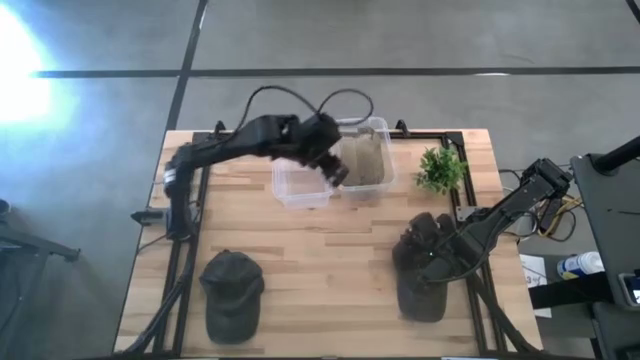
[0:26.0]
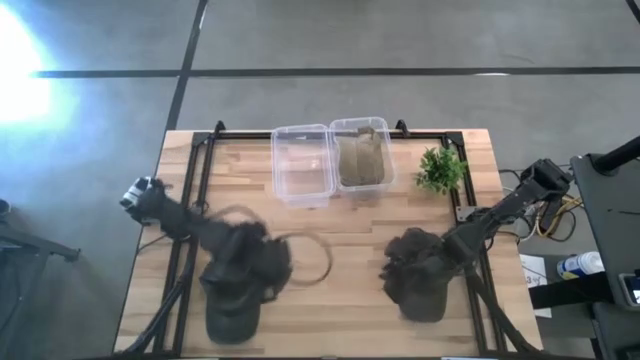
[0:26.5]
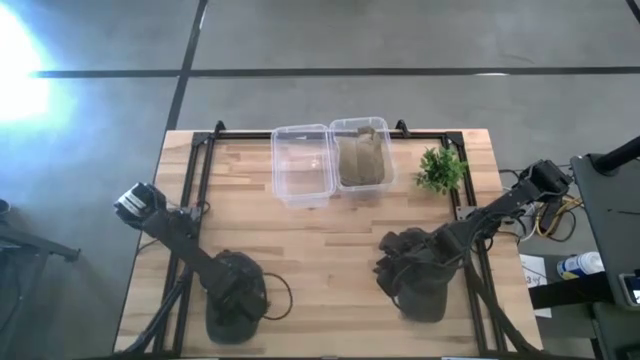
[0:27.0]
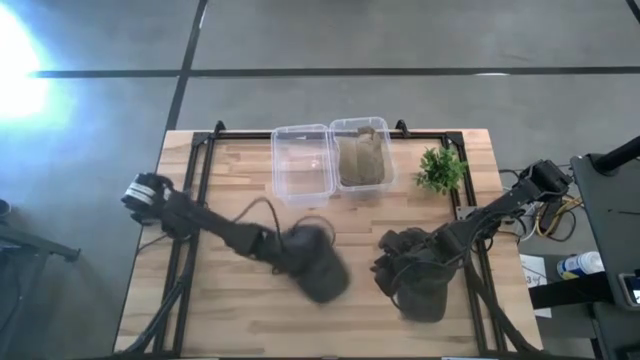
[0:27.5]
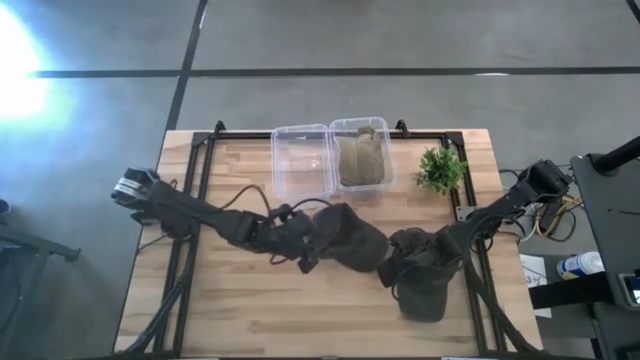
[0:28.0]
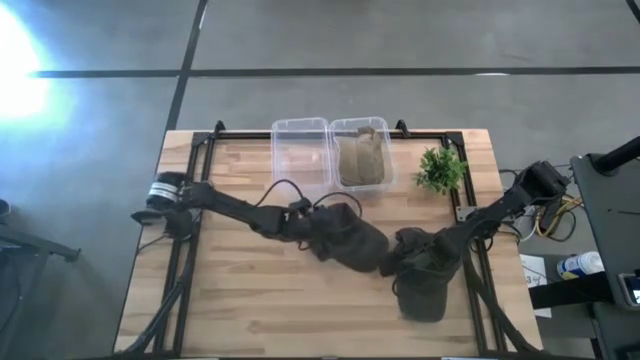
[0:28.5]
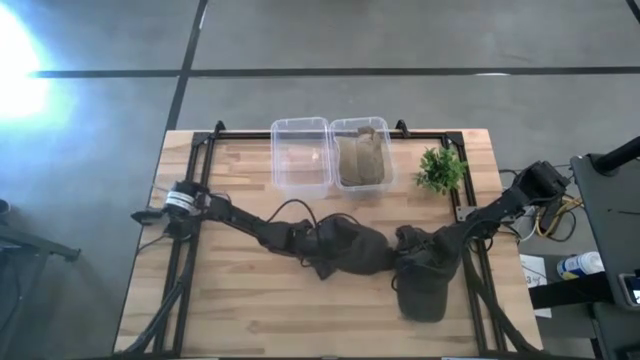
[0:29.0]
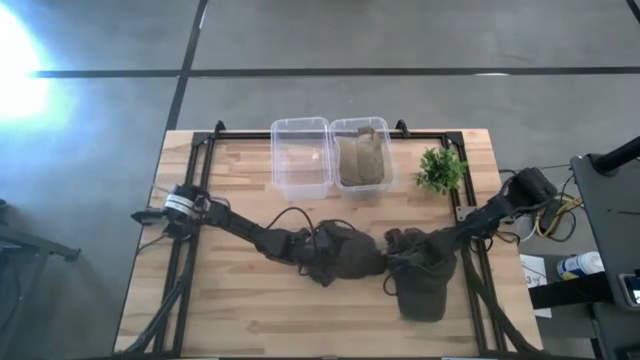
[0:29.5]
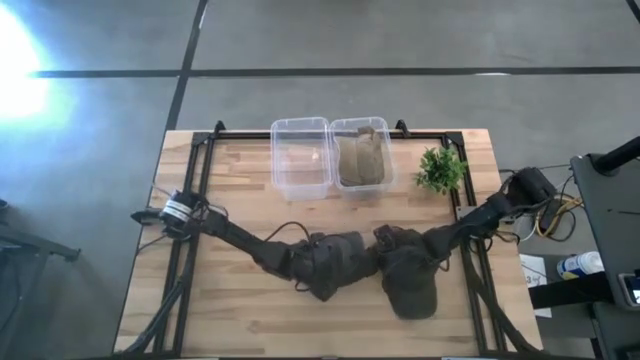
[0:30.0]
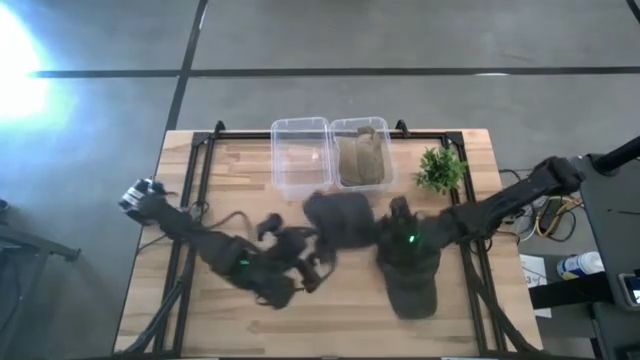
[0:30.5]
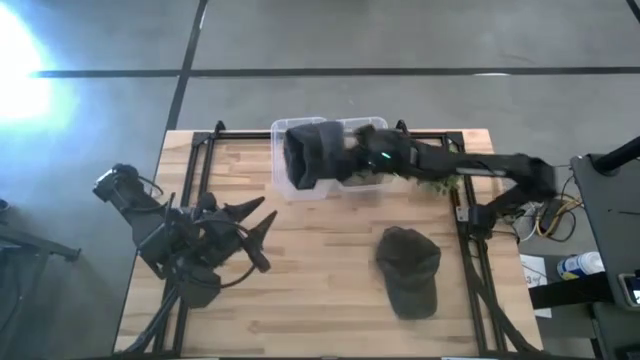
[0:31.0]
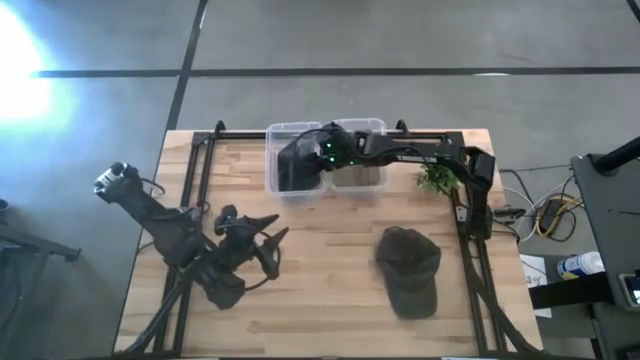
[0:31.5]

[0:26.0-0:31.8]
Task: Pick and place caps into container
Put the left black cap into the left transparent container

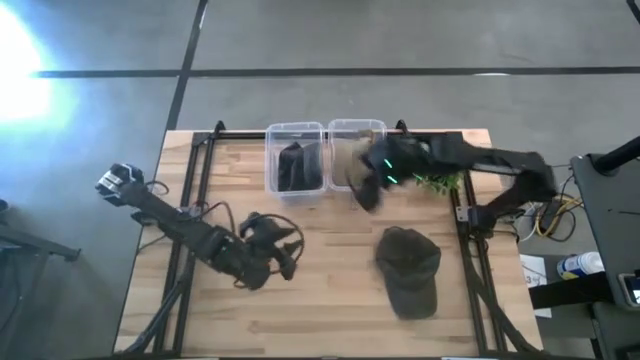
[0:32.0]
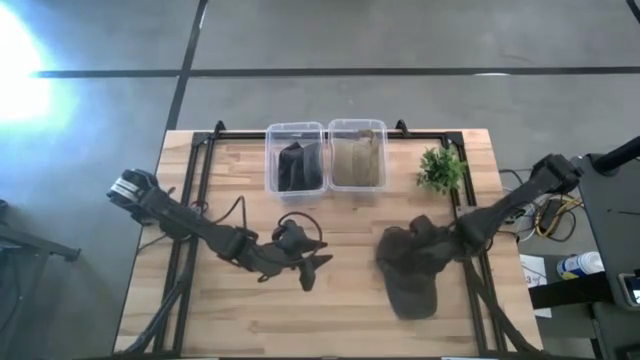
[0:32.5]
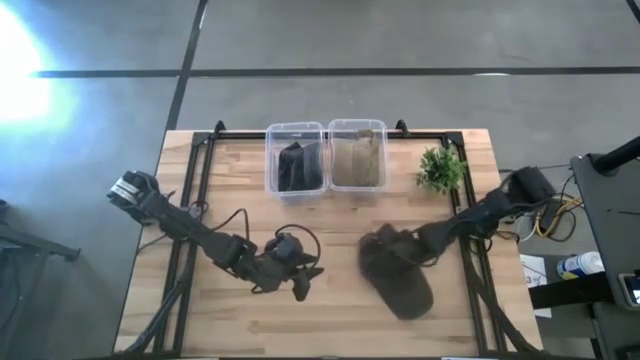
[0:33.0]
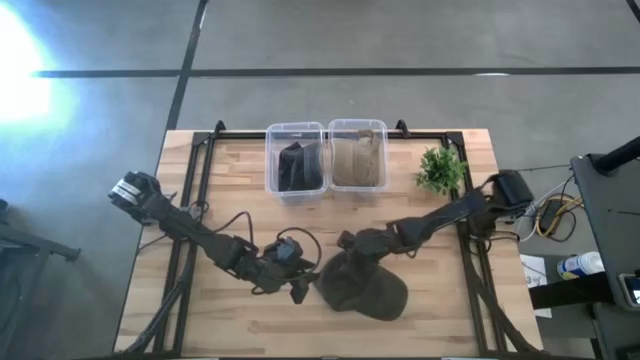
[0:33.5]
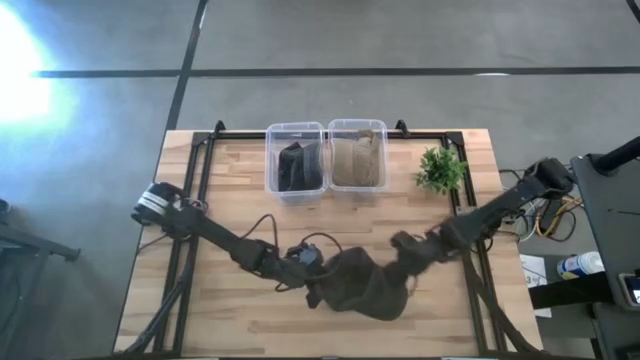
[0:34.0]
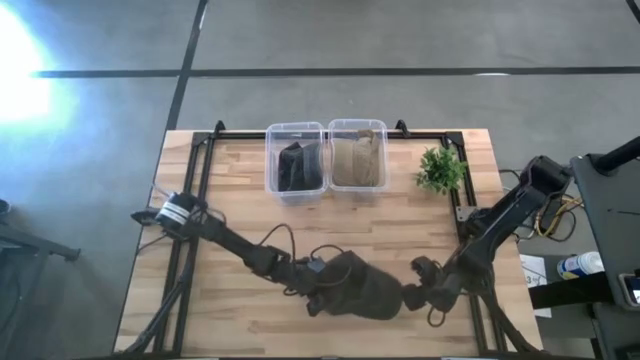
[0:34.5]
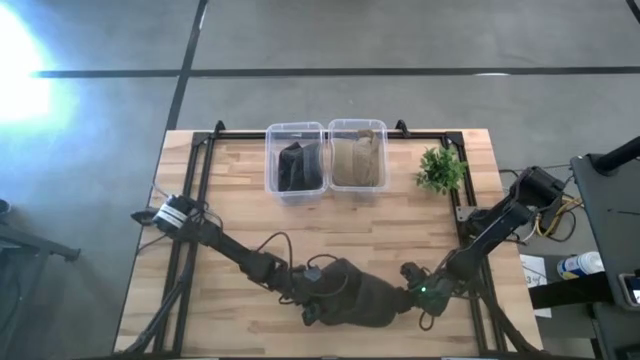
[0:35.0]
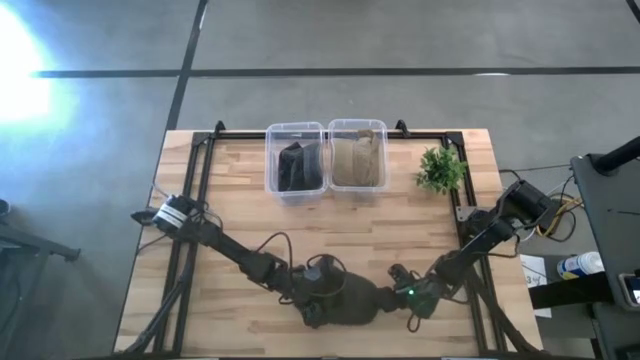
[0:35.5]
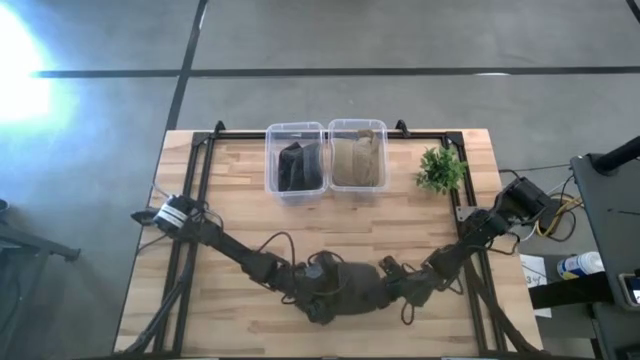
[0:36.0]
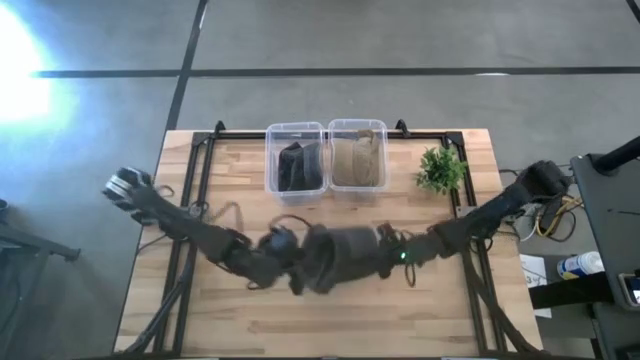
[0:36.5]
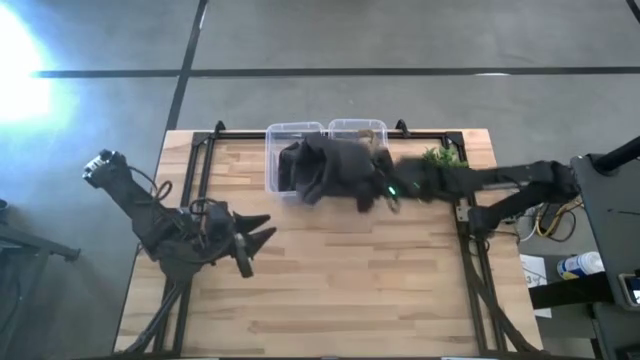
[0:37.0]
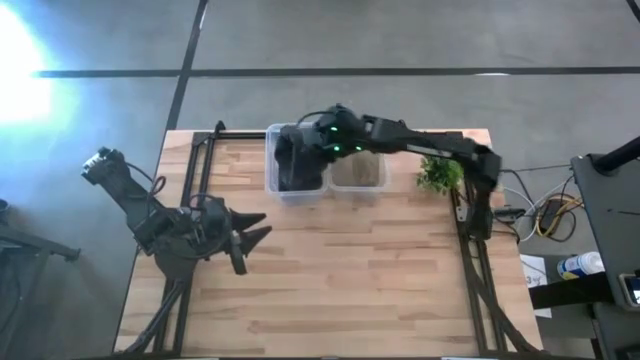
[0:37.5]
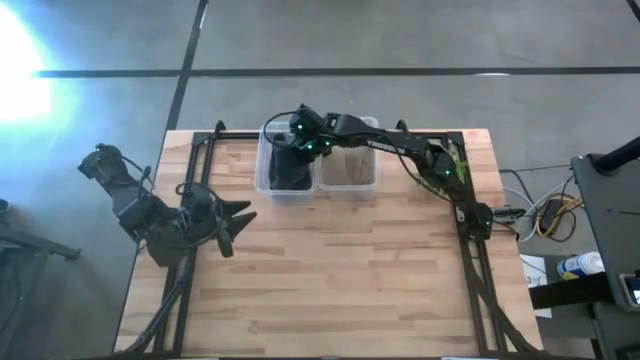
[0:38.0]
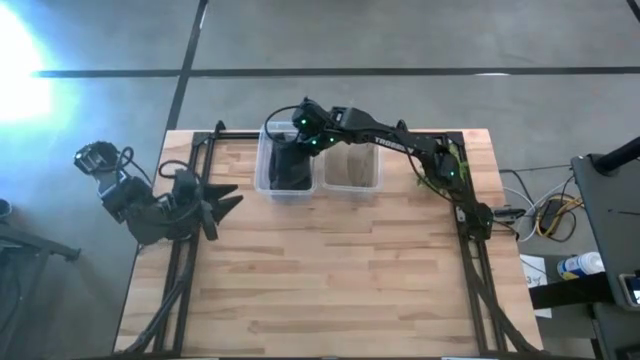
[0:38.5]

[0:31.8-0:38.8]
Put the black cap into the left transparent container

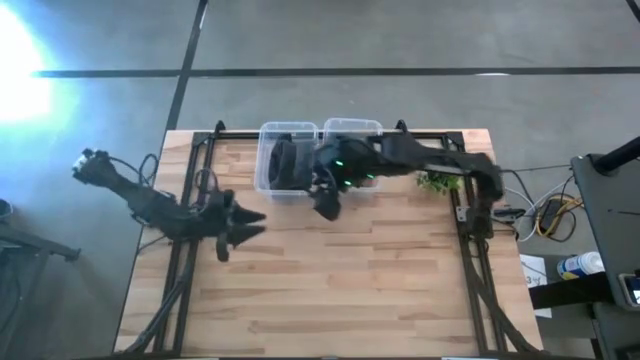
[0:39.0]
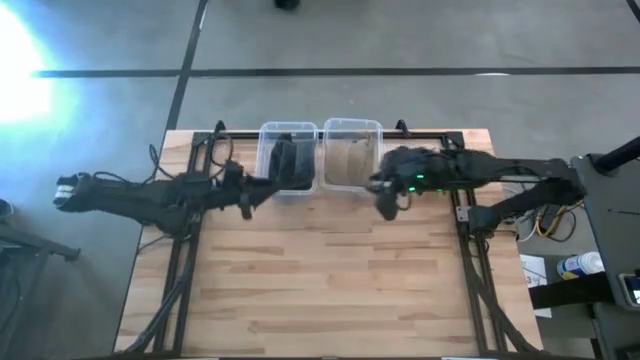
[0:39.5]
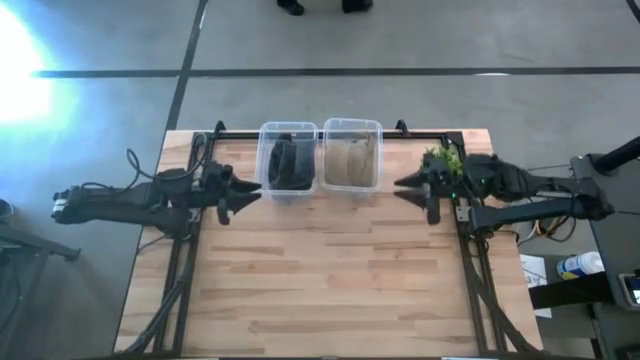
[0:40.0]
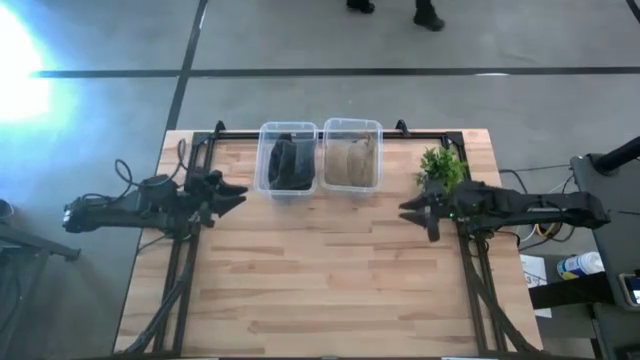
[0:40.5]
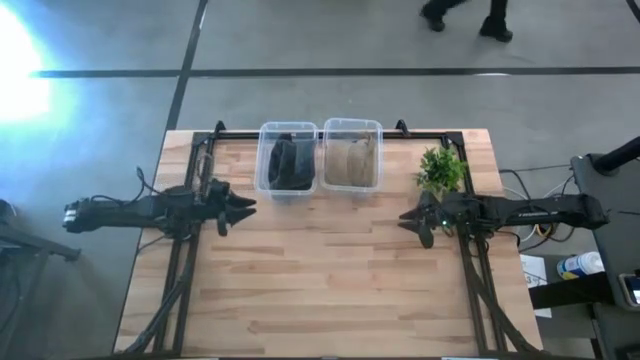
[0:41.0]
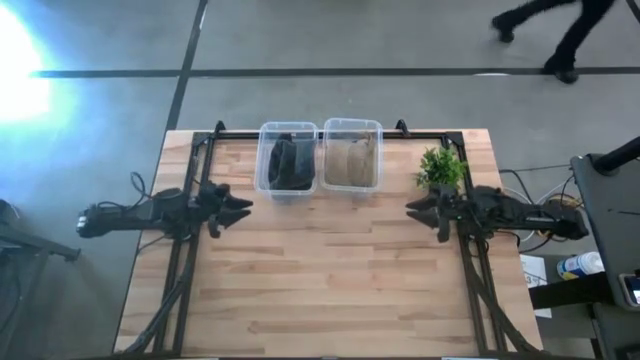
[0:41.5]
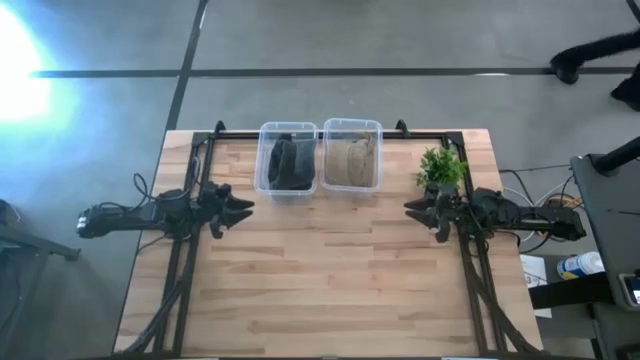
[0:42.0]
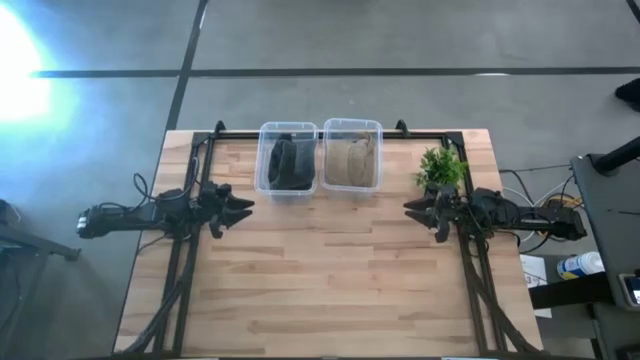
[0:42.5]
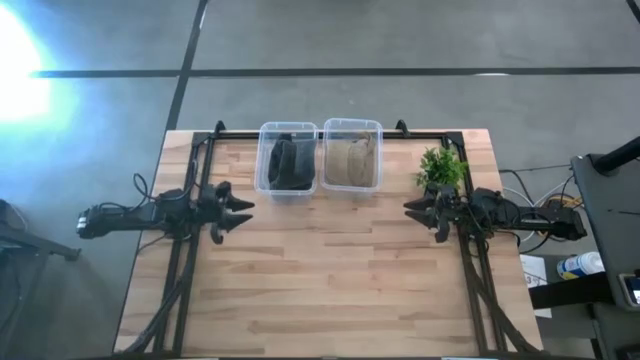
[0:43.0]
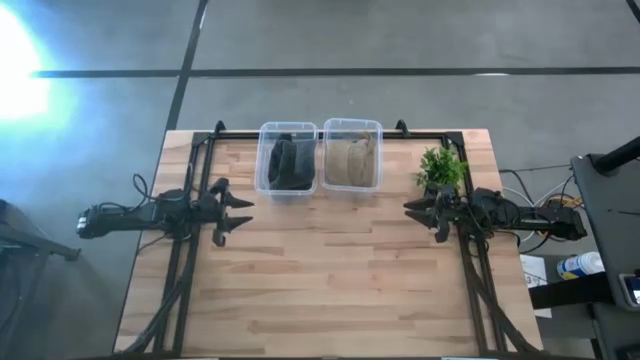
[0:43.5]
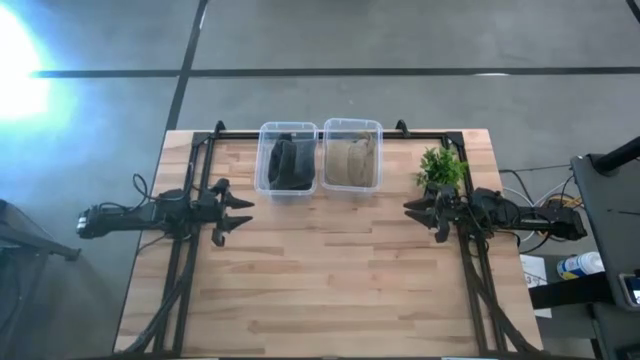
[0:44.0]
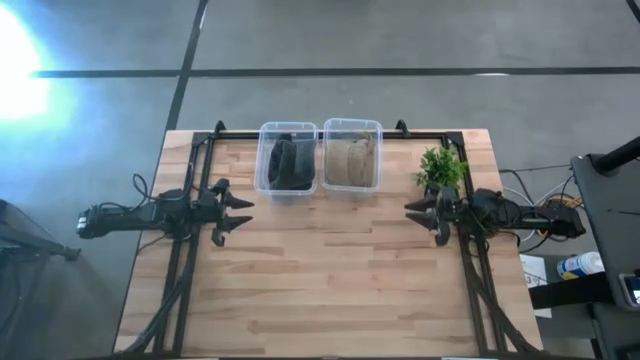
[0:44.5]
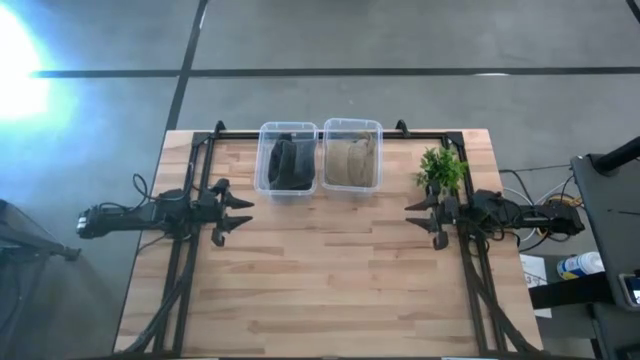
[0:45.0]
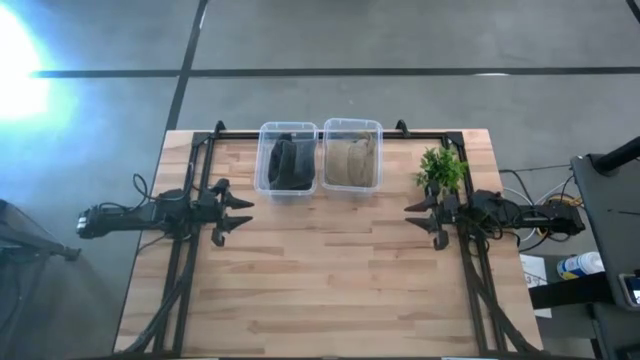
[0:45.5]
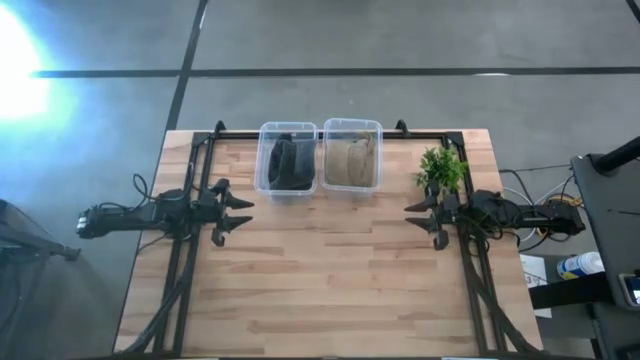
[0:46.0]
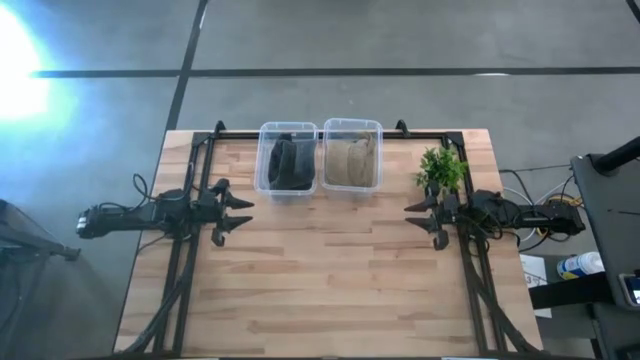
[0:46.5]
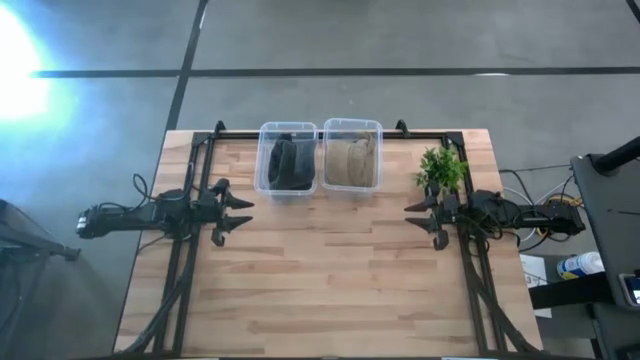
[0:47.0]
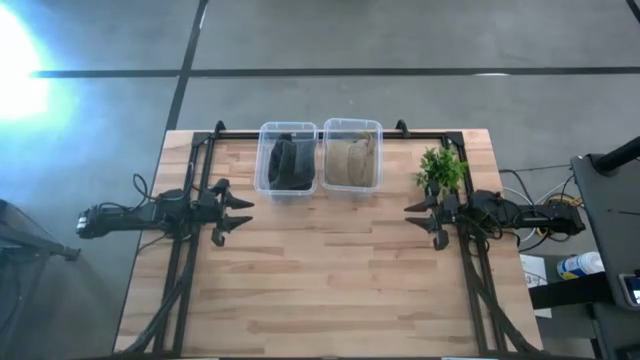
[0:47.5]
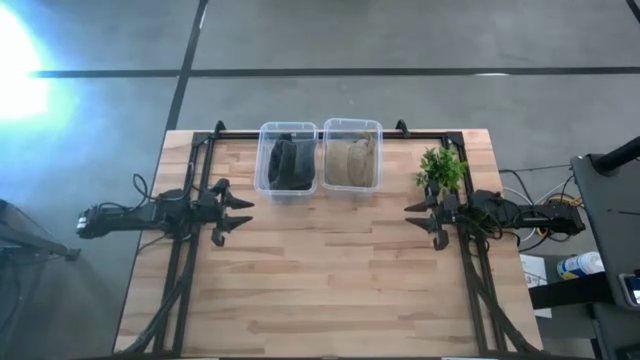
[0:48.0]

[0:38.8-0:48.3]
Return to home position
